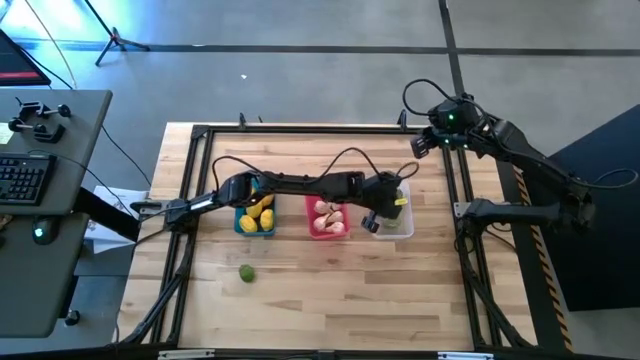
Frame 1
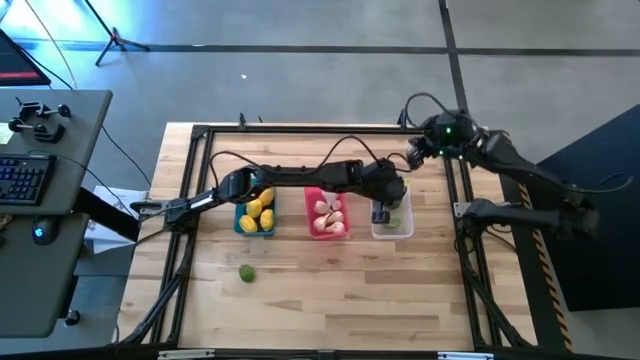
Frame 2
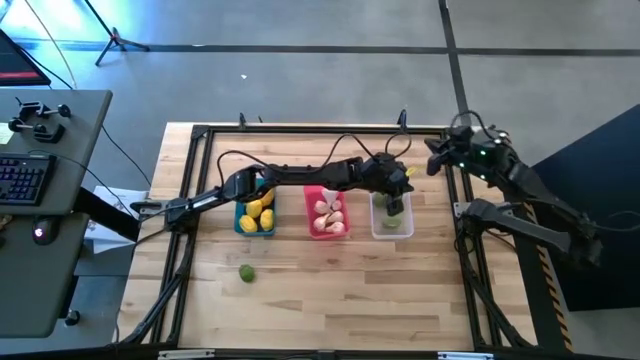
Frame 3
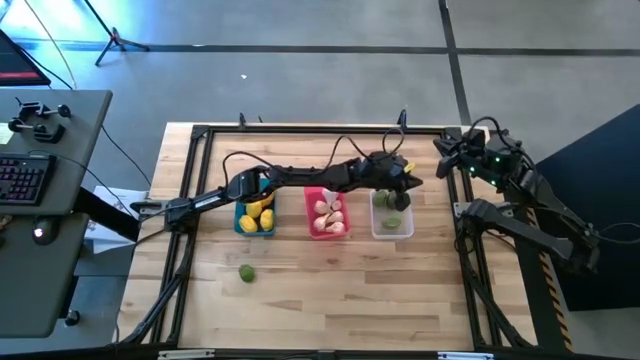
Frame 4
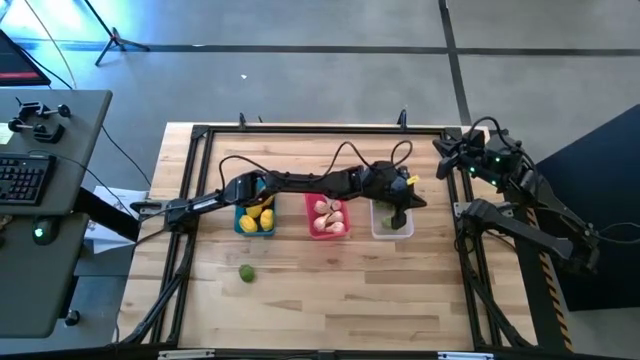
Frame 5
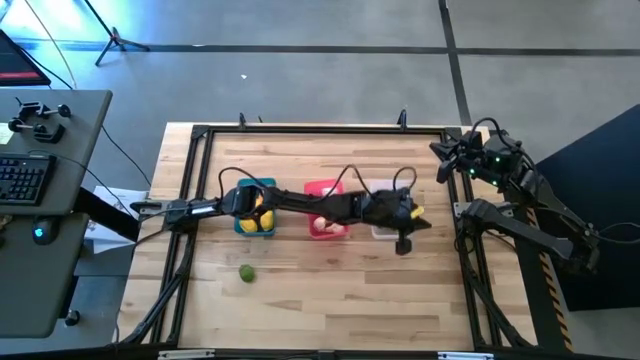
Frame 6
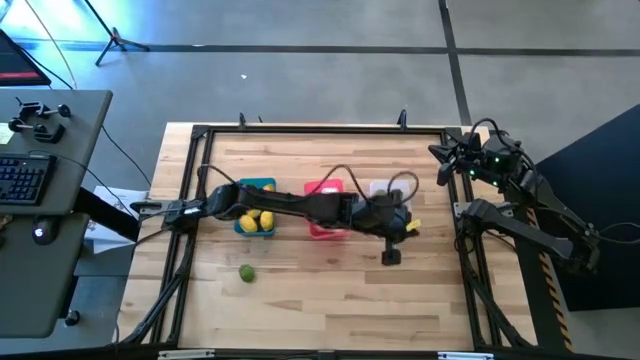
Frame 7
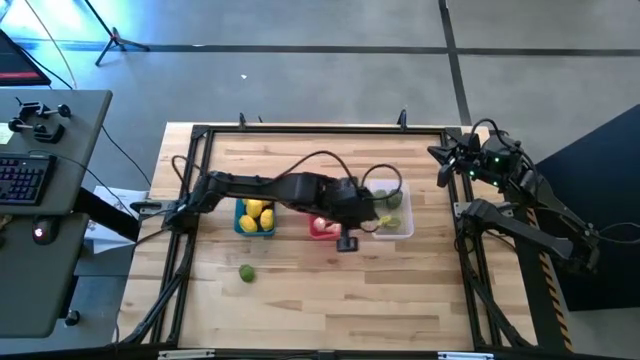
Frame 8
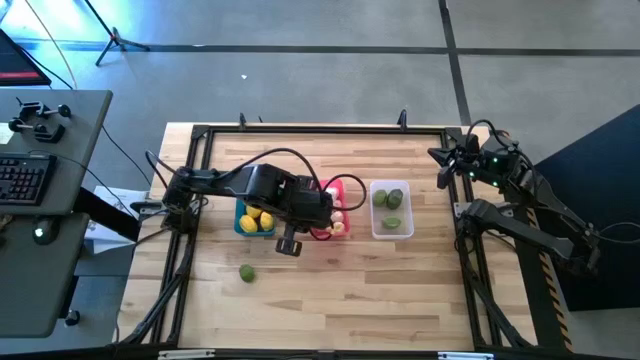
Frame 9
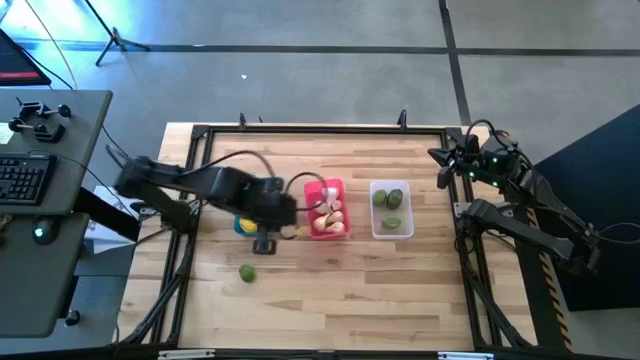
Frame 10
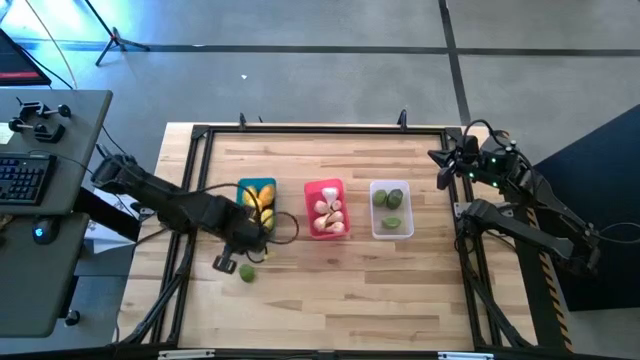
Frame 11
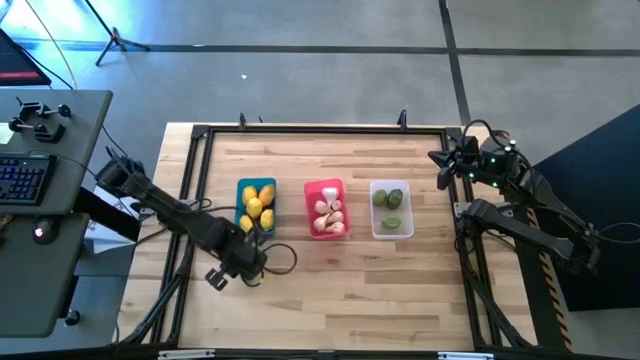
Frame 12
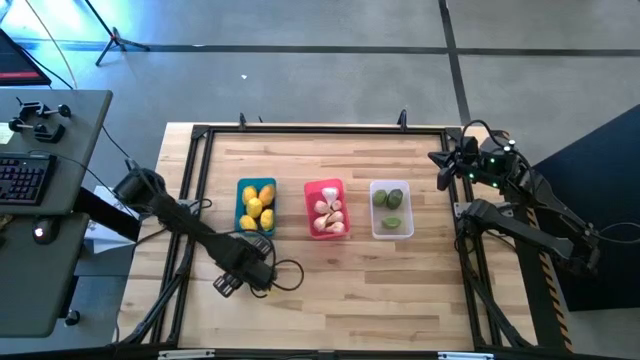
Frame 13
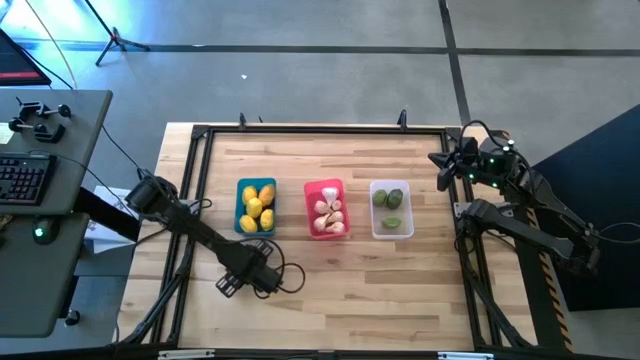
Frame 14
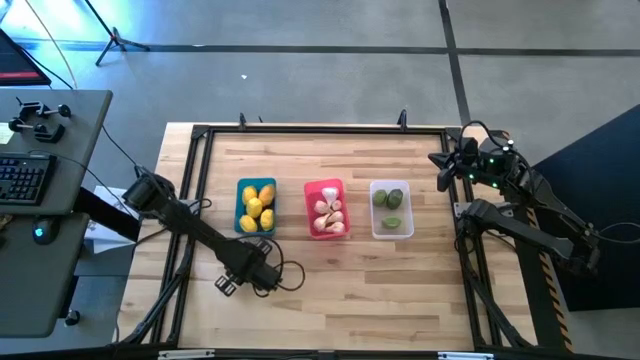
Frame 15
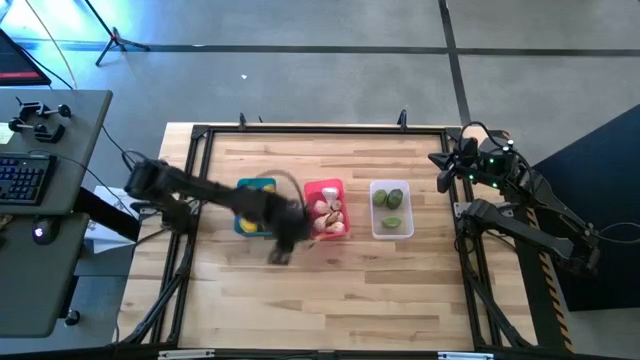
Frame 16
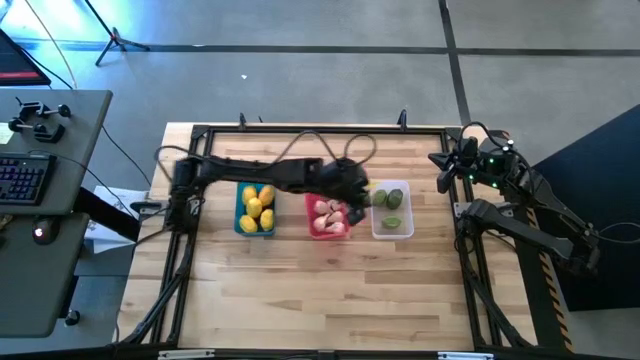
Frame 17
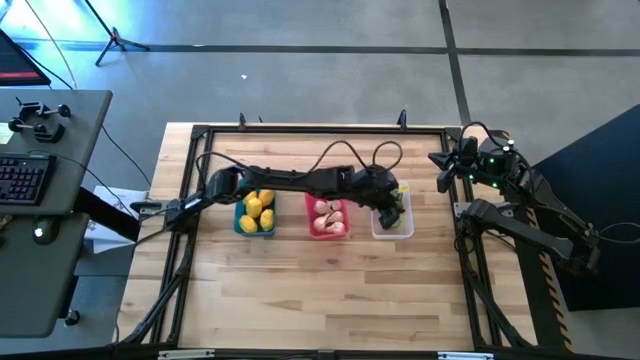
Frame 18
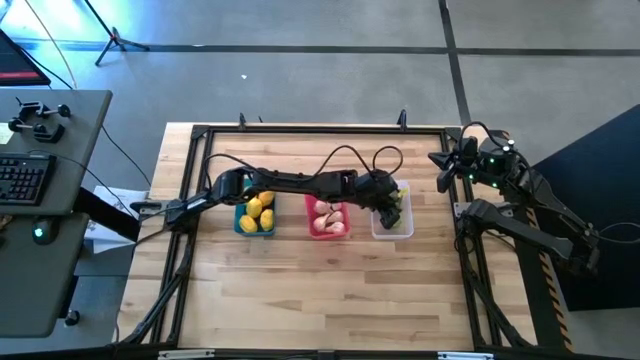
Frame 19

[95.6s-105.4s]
Task: Sort produce into baskets
Put the green lime into the white bin

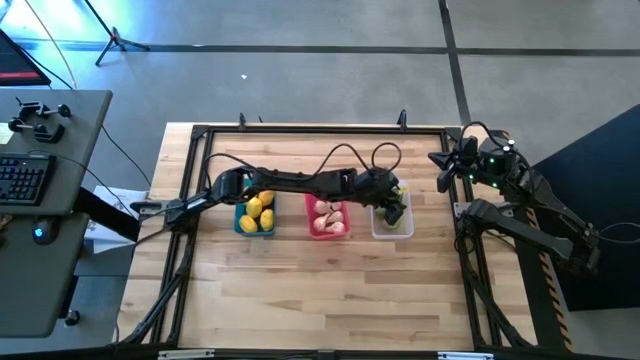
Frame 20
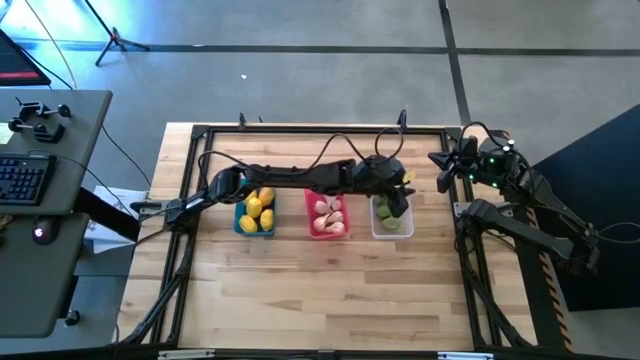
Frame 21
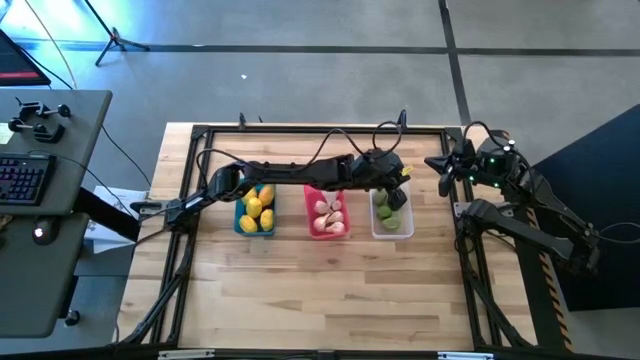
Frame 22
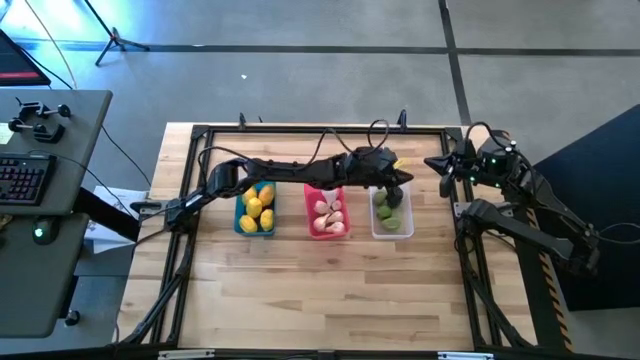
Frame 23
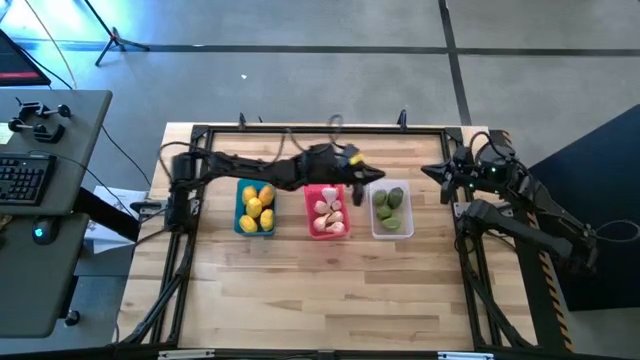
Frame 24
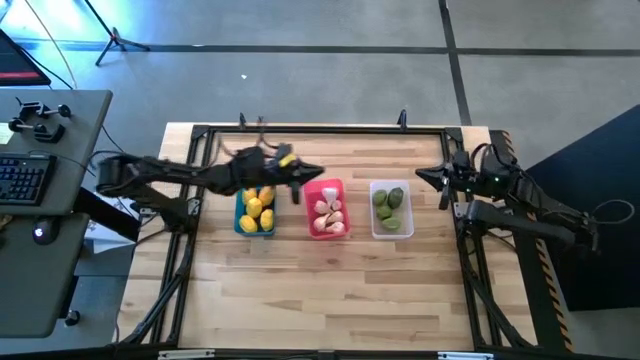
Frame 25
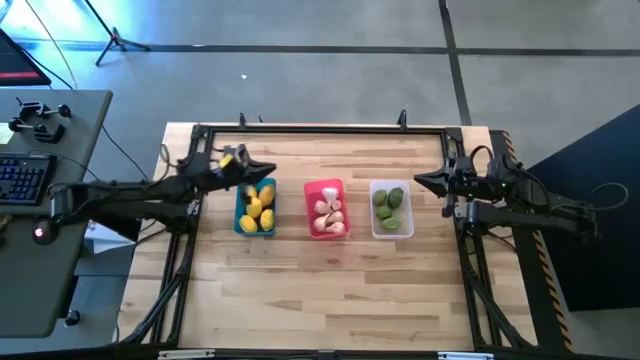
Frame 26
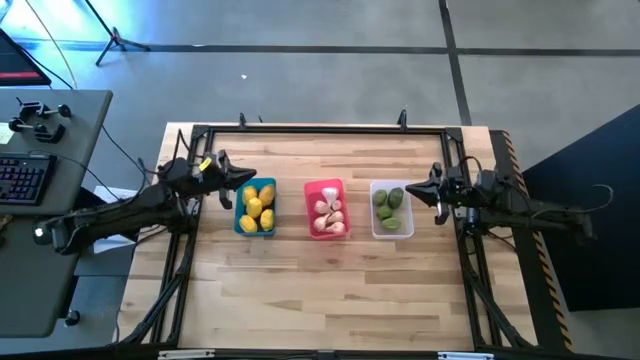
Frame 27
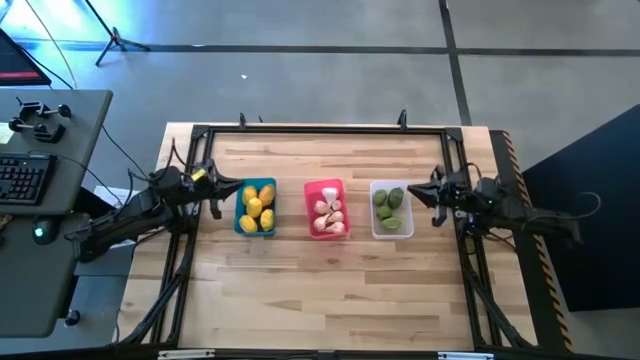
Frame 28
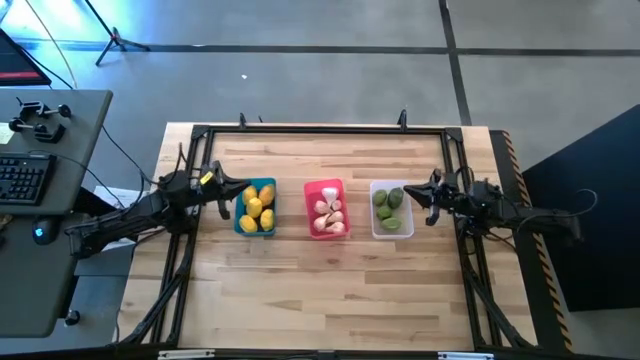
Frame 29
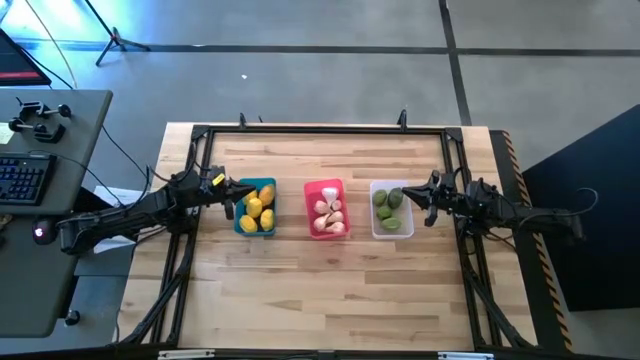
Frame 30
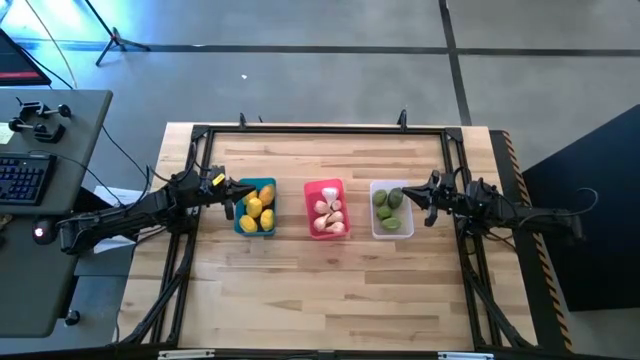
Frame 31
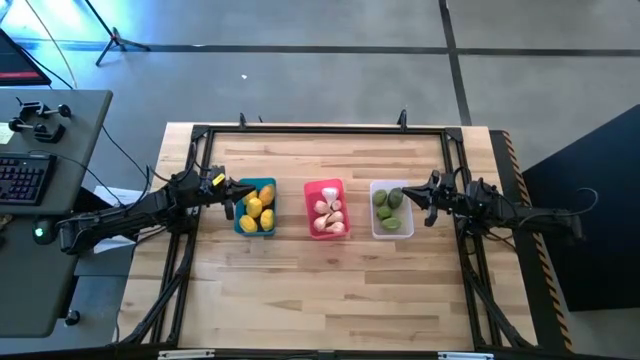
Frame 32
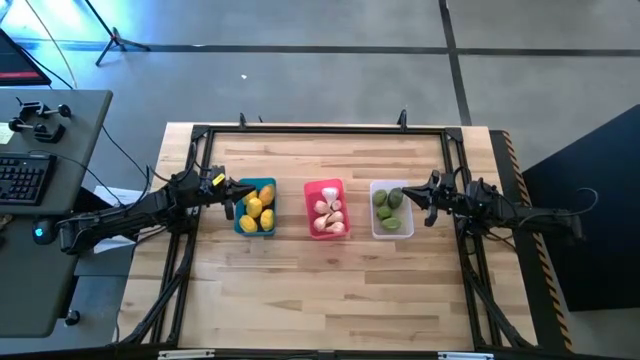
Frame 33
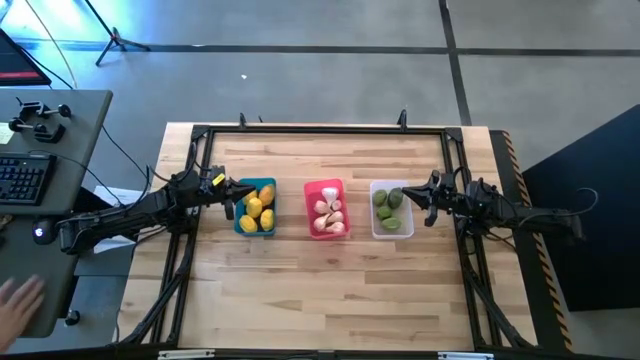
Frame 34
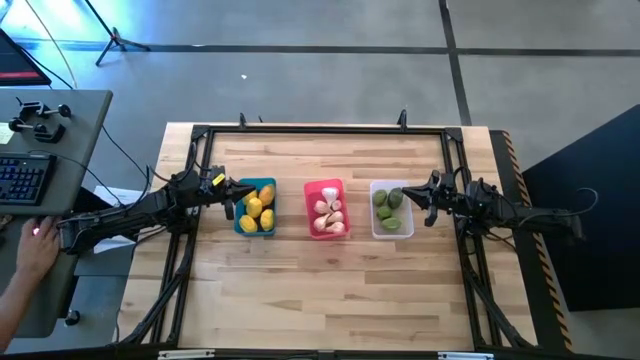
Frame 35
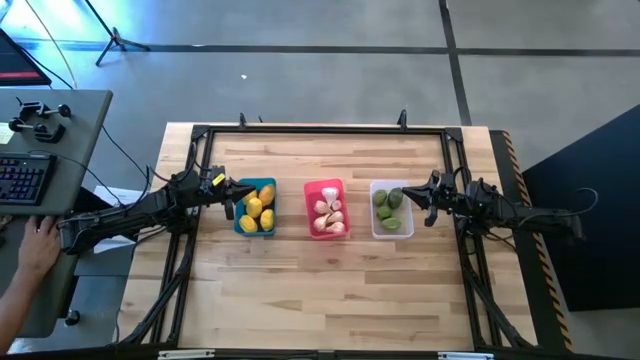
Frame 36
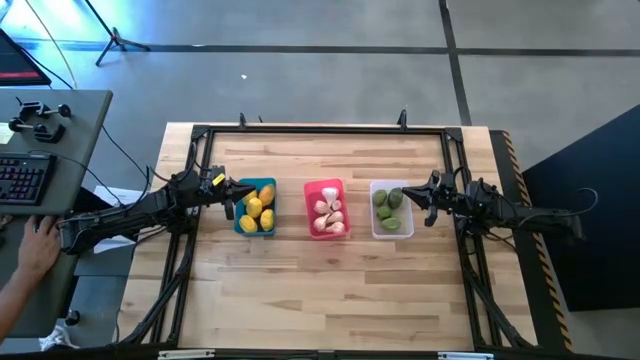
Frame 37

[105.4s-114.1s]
Return to Home Position

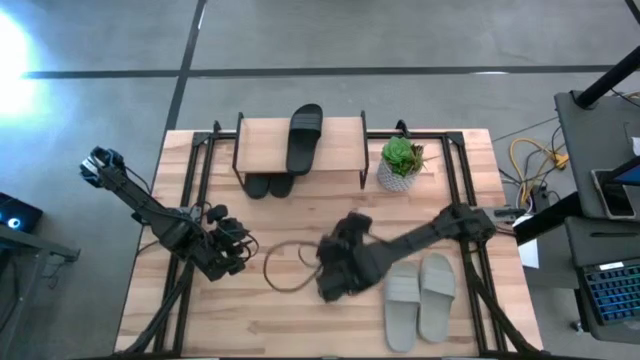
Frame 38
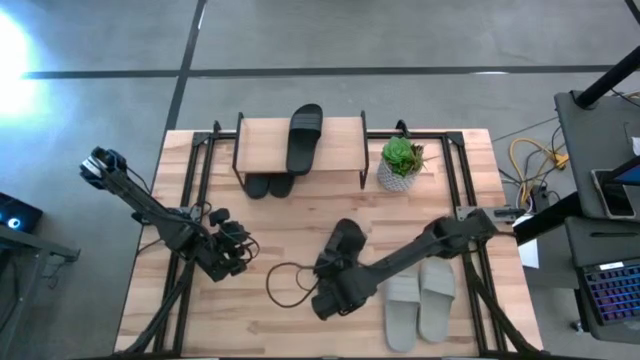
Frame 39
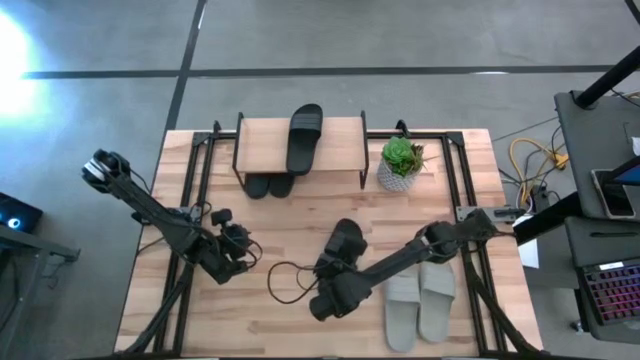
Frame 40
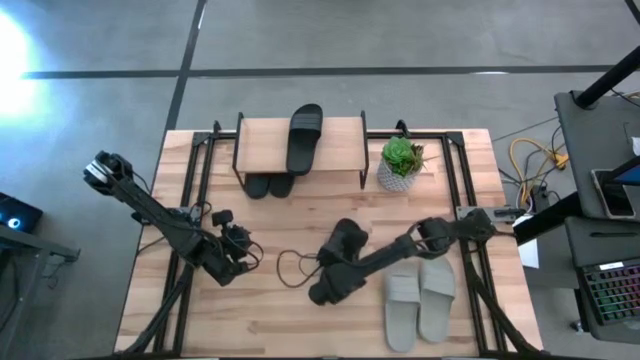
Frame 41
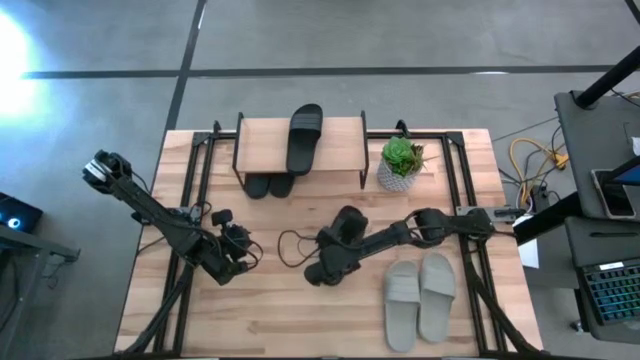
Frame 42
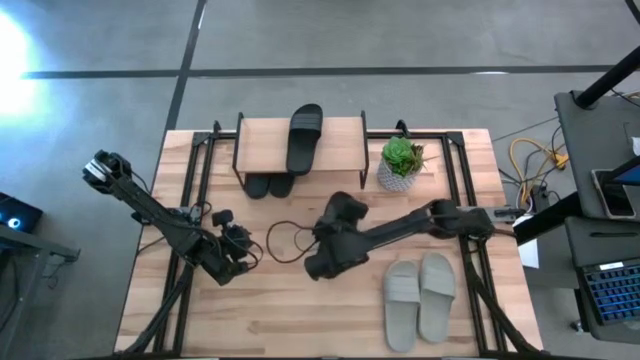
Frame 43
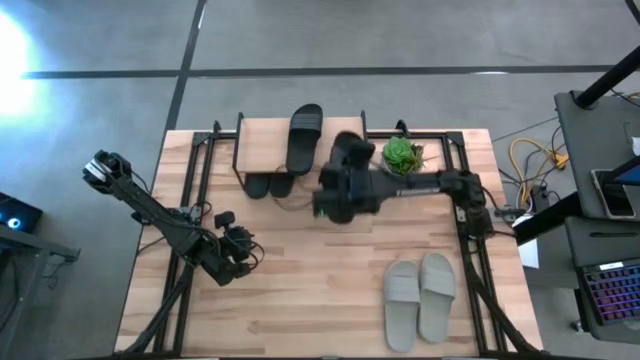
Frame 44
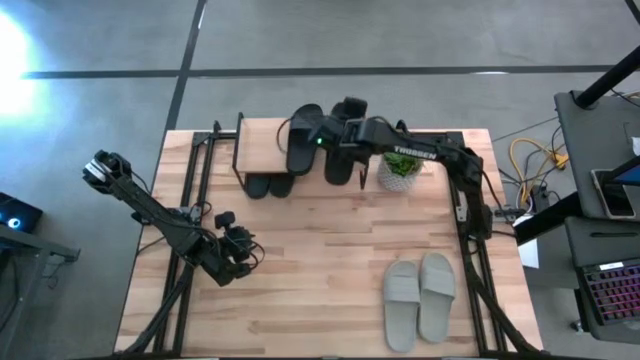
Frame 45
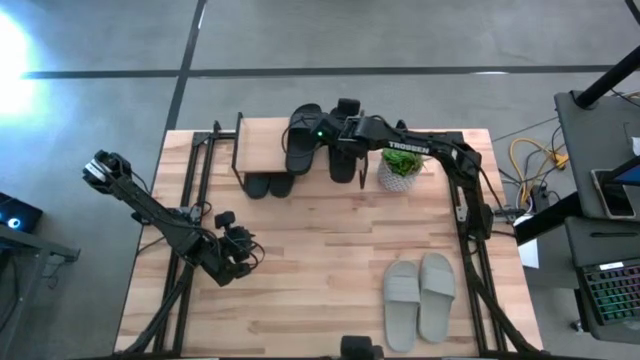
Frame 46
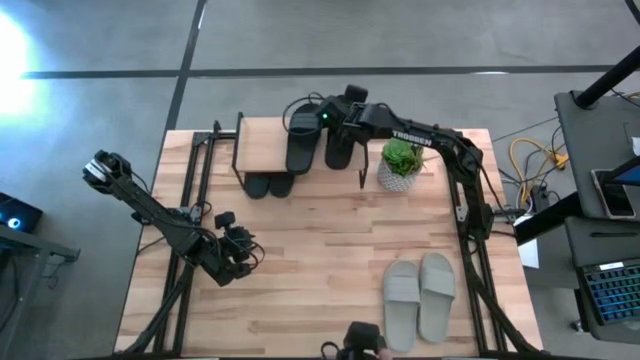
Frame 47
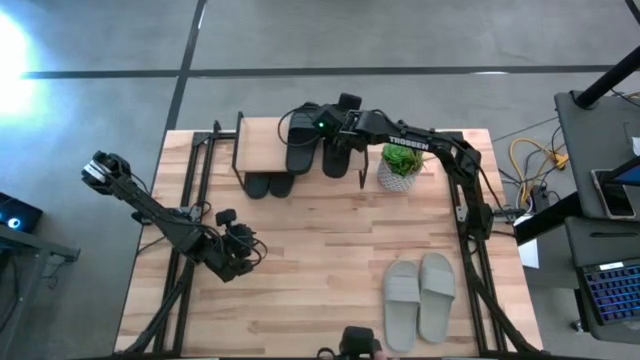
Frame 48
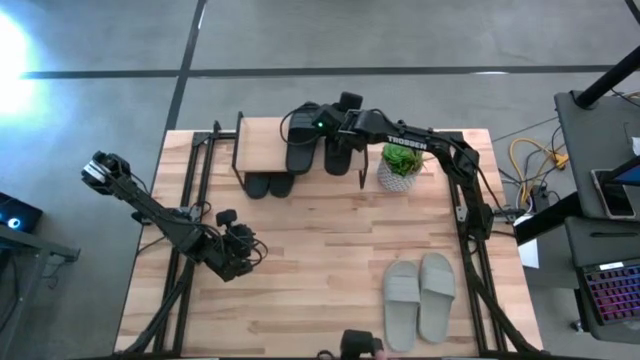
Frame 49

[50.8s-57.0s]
Task: Pick and place slides into the shelf
Put the black slide on the shelf
